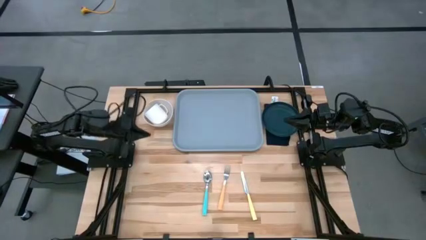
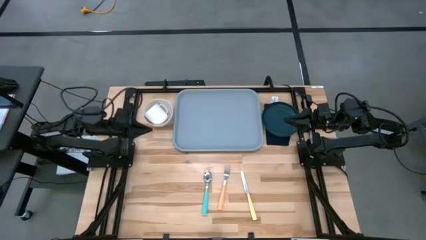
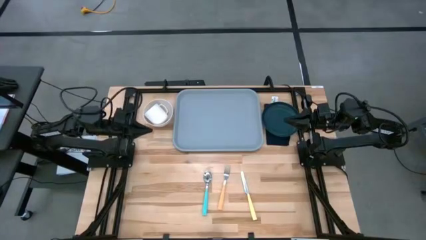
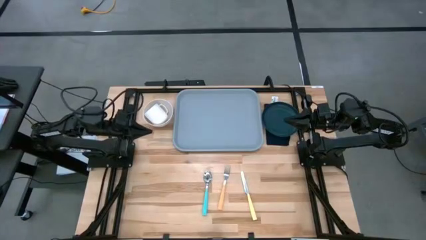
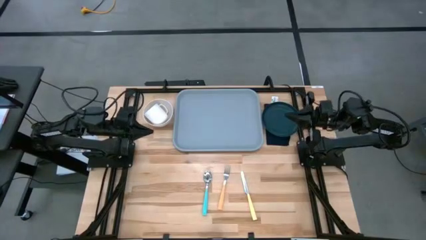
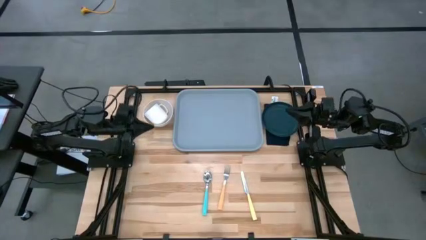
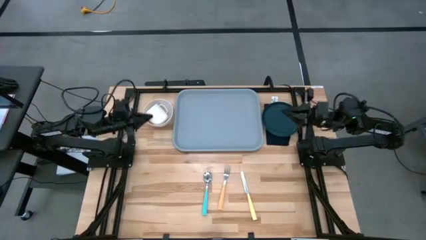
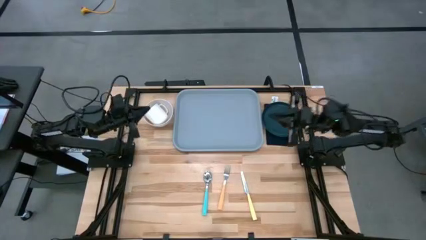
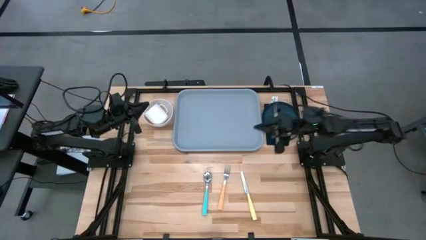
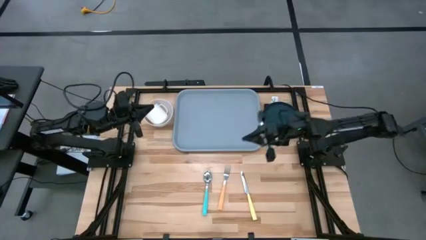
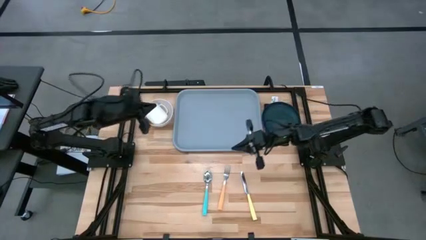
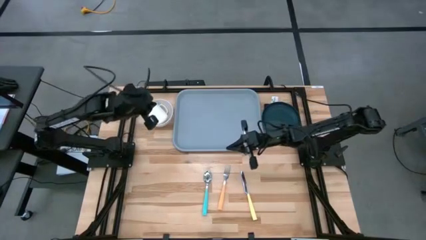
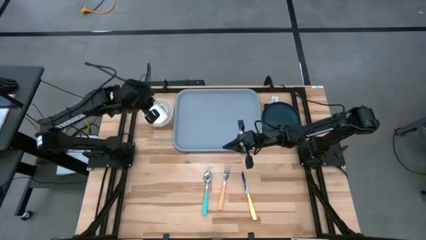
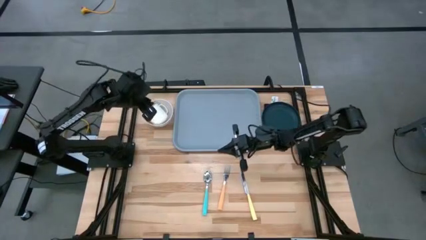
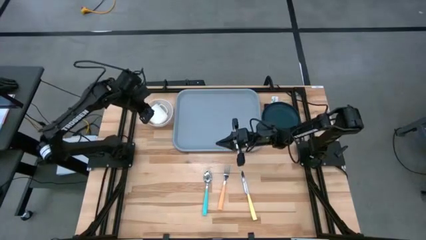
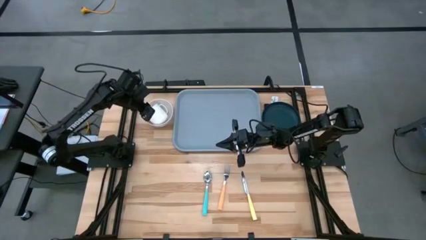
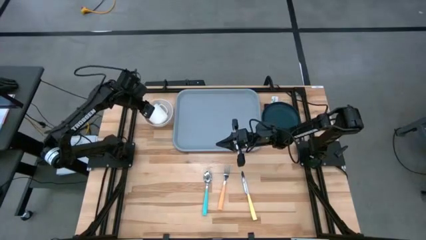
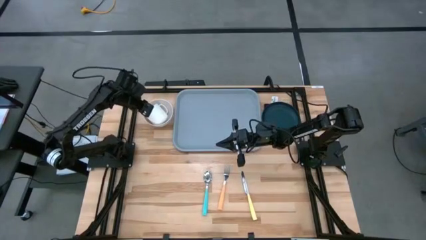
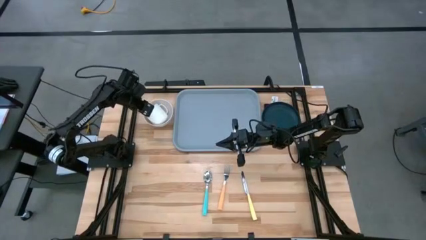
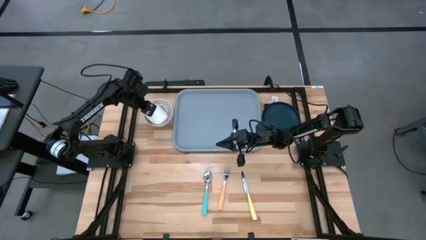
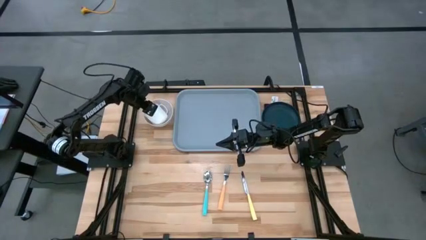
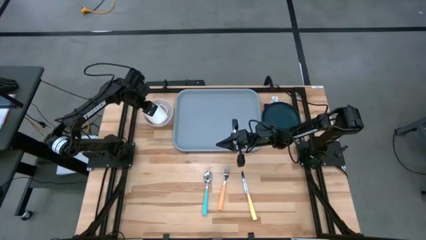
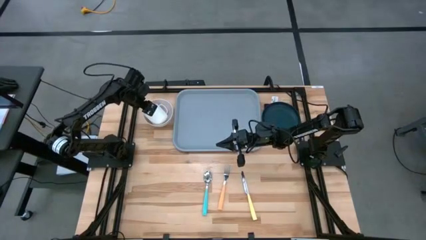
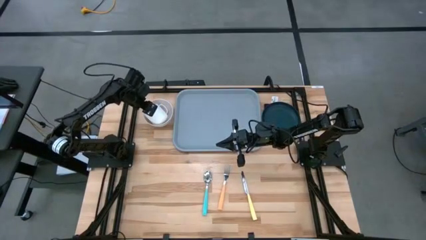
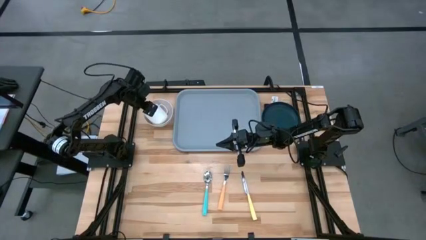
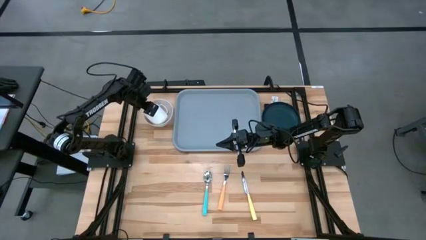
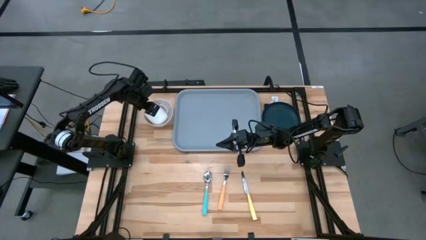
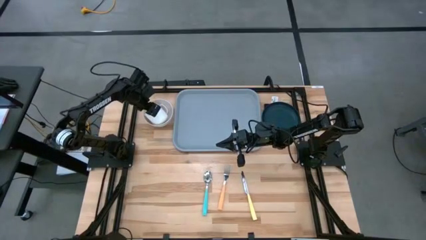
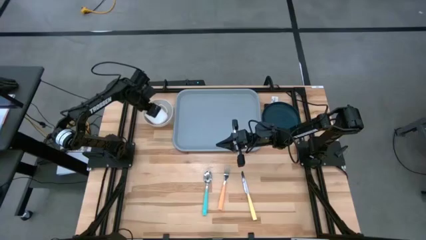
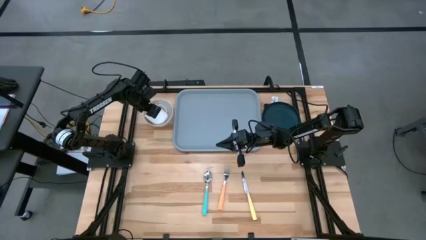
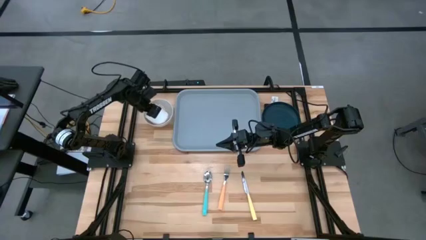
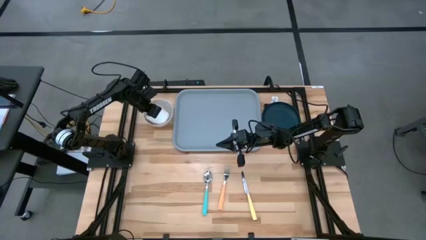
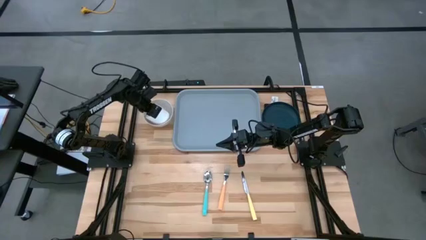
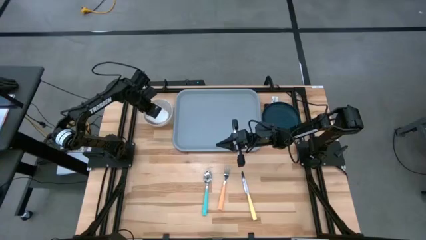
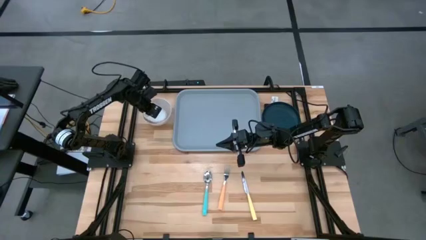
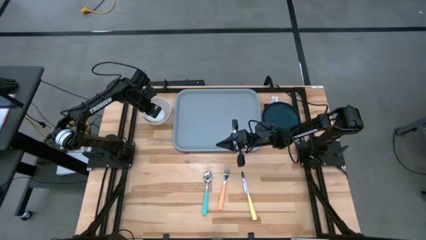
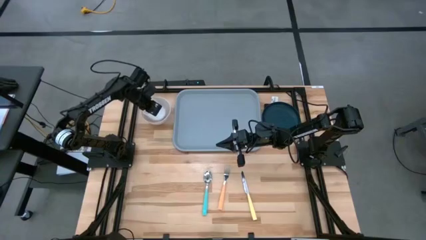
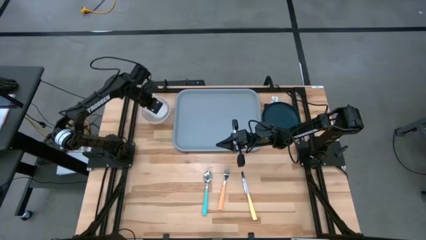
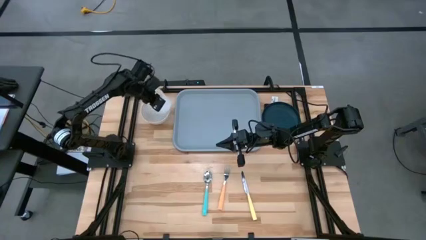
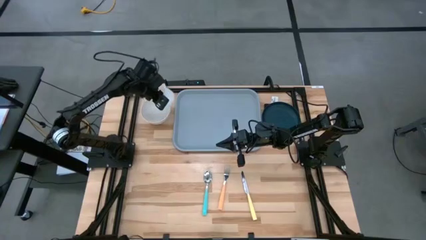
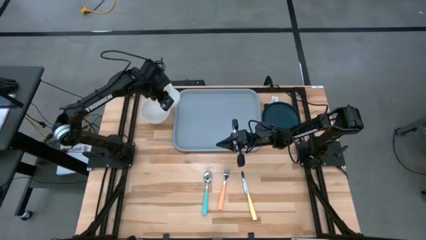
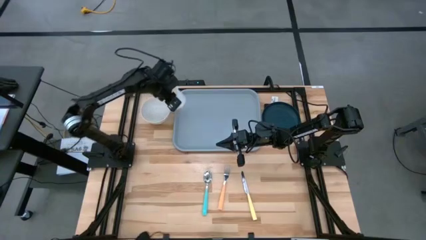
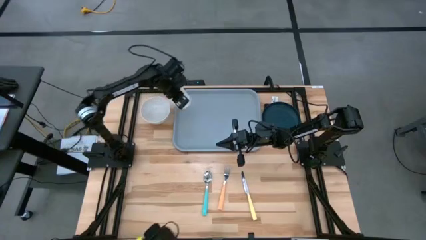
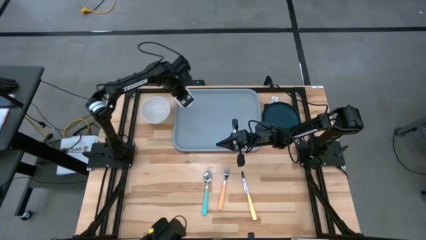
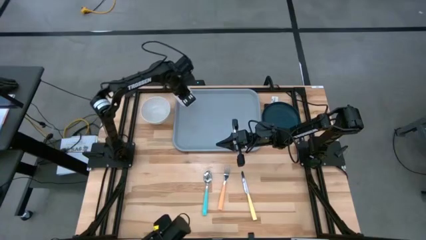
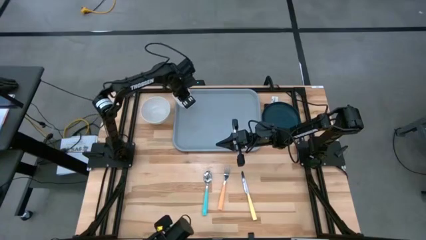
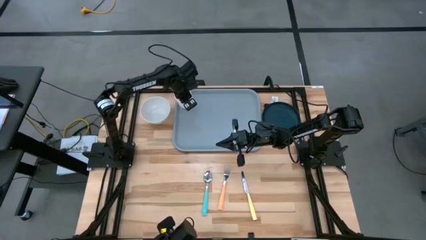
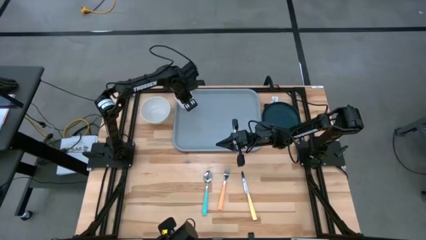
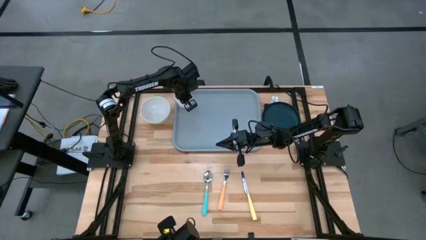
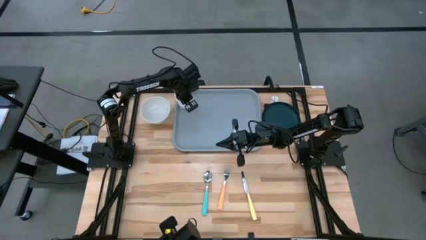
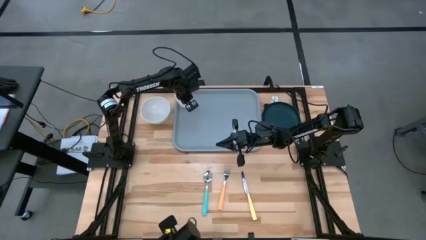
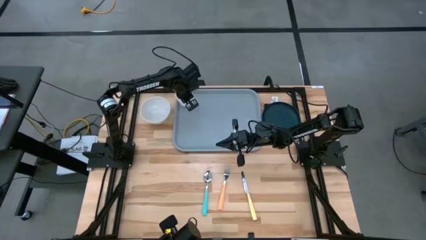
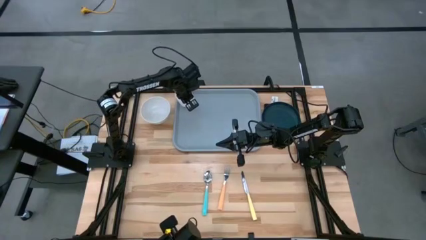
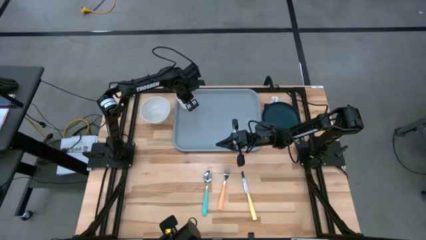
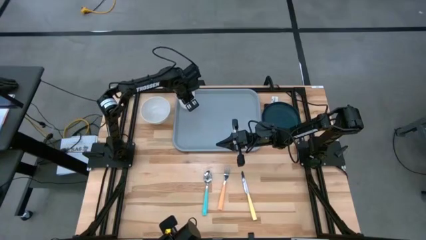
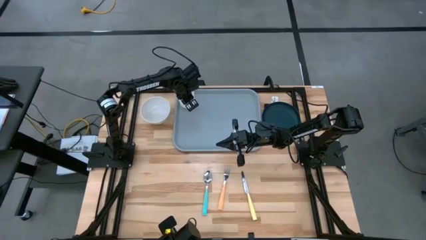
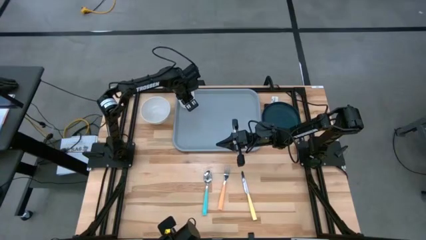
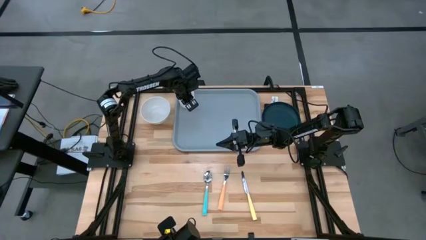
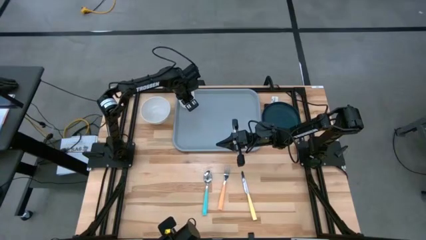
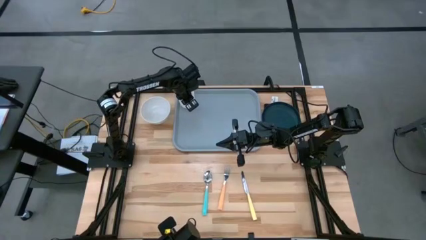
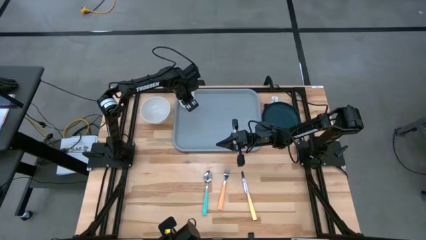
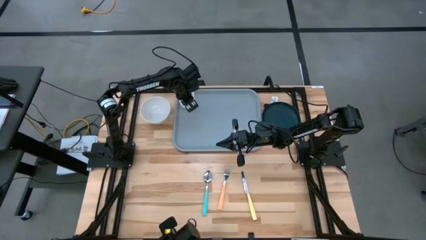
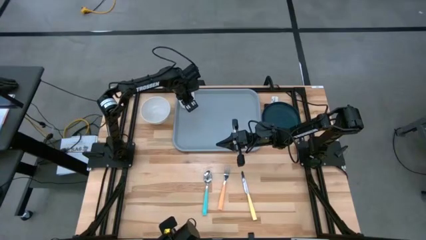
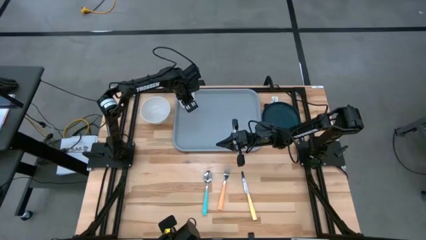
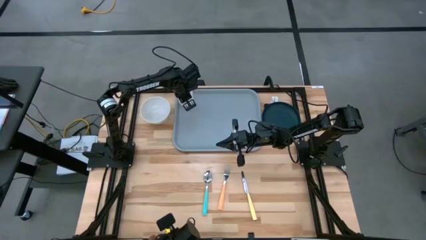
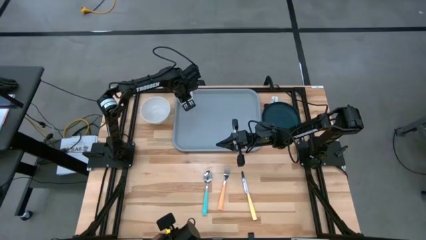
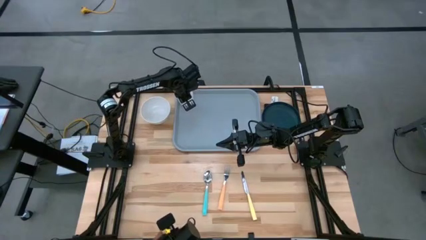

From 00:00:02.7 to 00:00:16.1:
Task: Set up tray
Put the white mug on the top left of the gray serving tray
